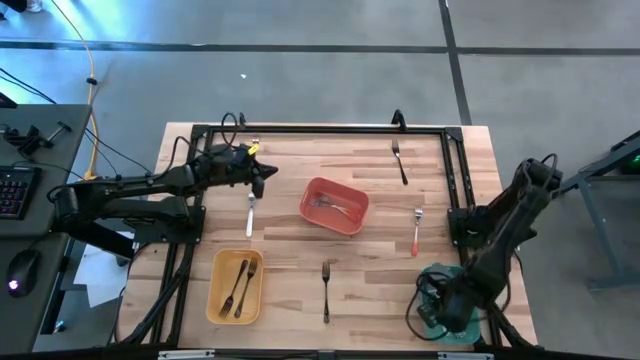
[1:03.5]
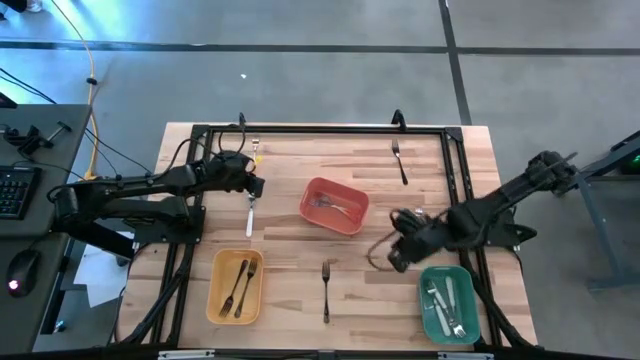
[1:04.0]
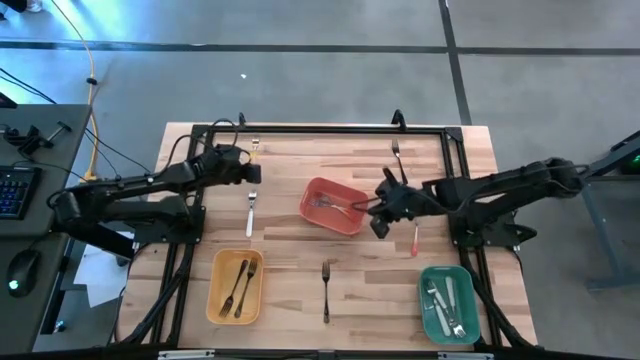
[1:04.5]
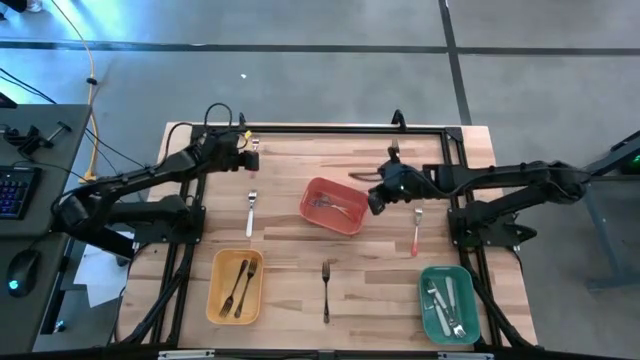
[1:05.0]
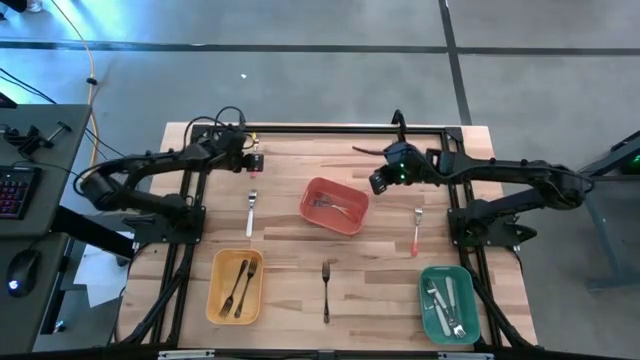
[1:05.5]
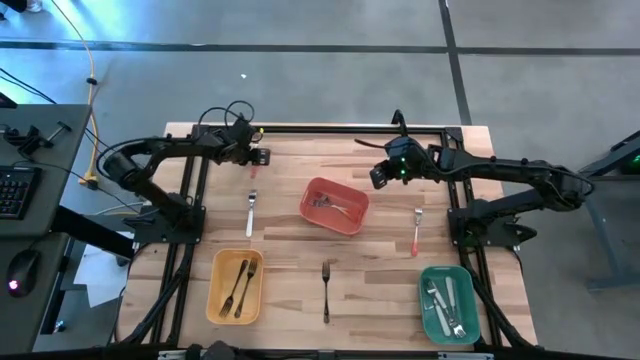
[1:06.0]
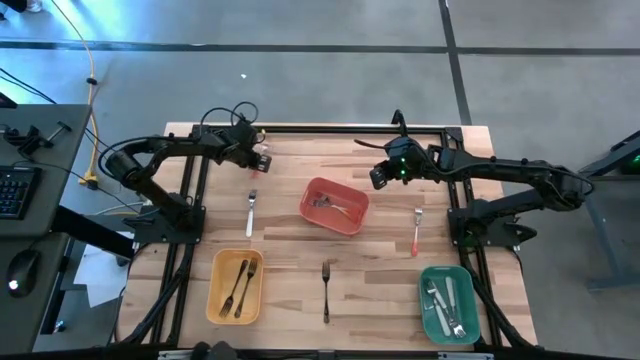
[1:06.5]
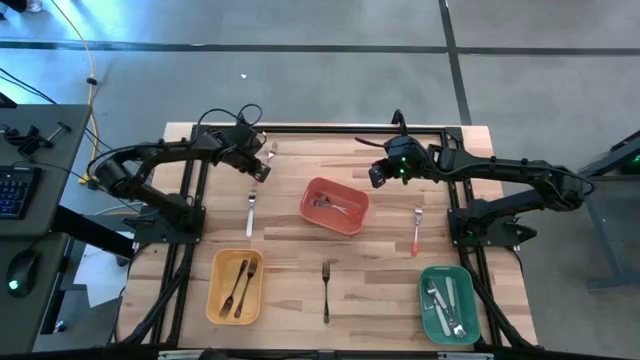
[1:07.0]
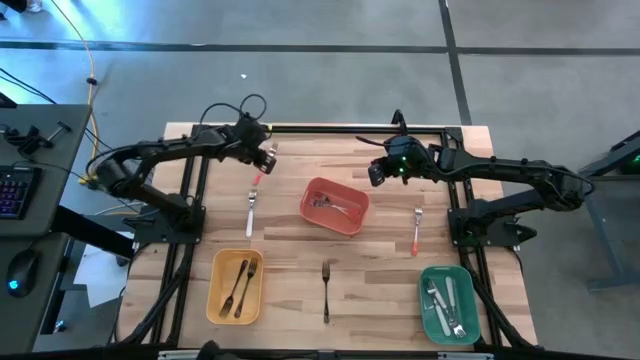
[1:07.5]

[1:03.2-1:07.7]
Task: Sort silverware by color (type)
Put the top orange fork into the orange bin

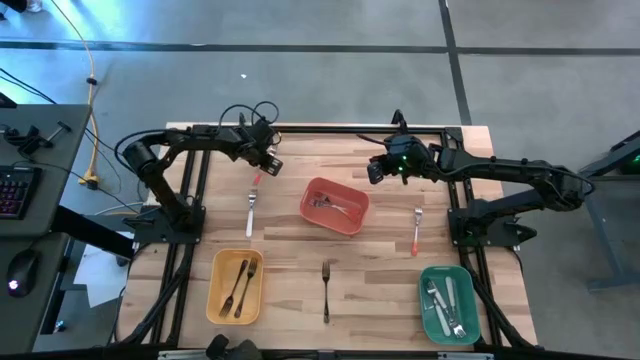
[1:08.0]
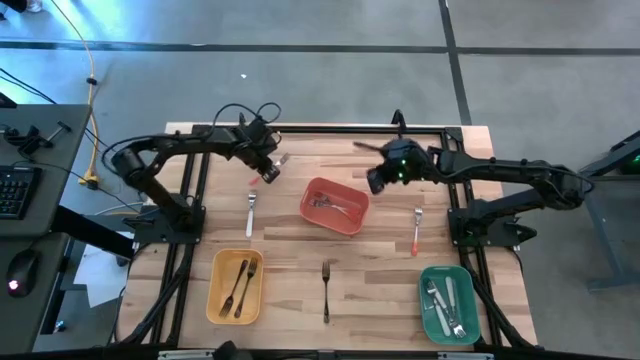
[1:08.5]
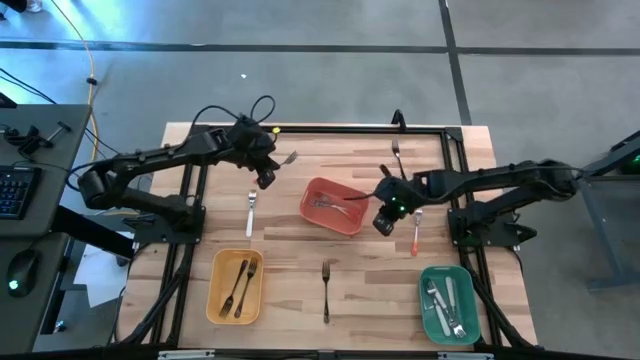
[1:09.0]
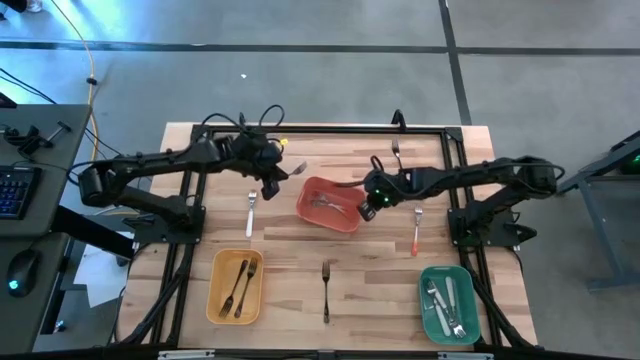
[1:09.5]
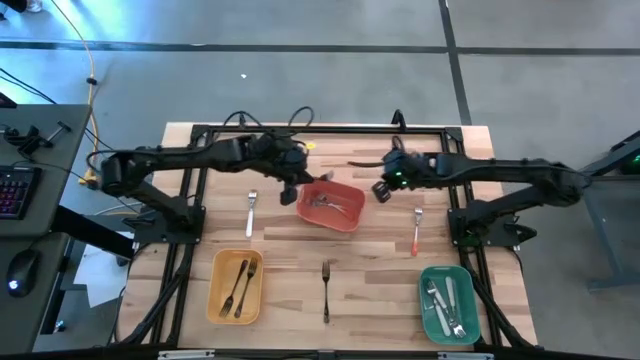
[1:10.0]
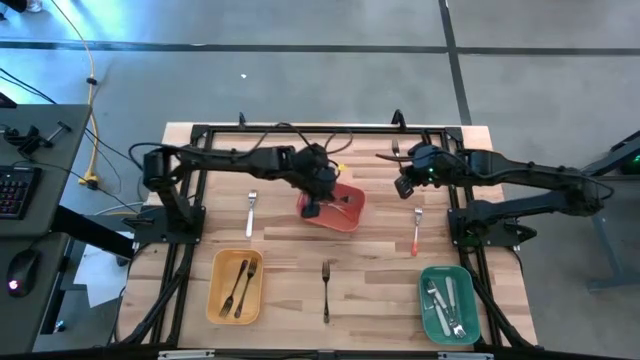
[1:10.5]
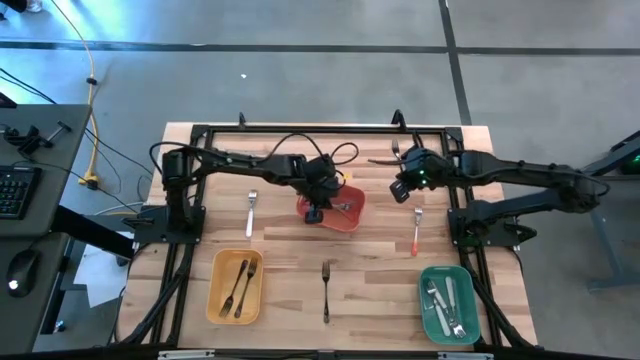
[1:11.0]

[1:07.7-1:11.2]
Put the top orange fork into the orange bin

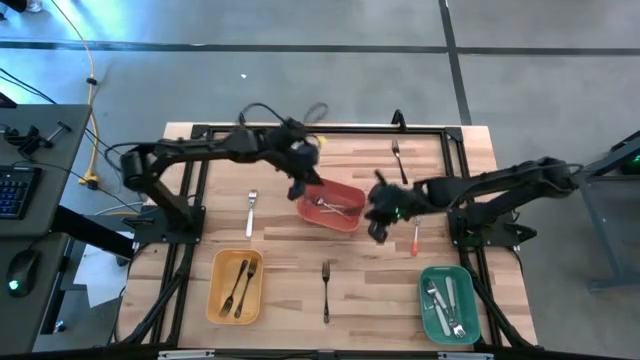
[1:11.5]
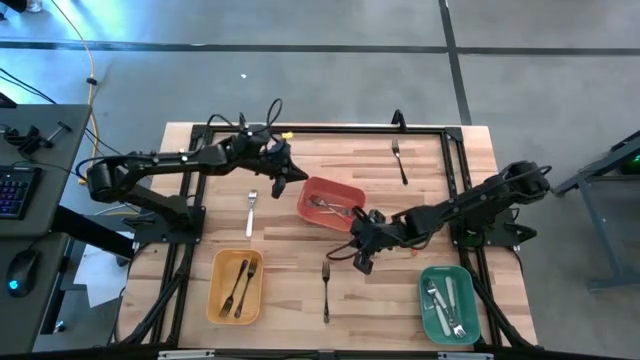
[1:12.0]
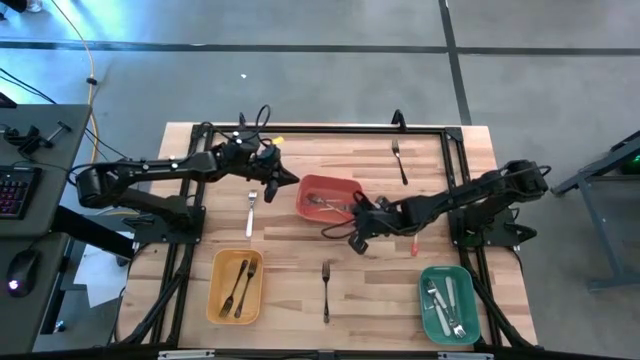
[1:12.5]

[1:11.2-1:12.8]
Adjust the orange bin

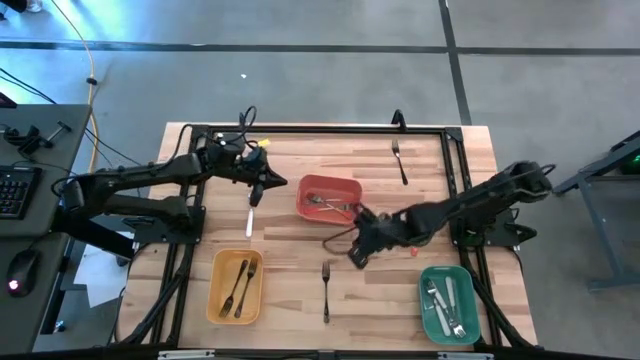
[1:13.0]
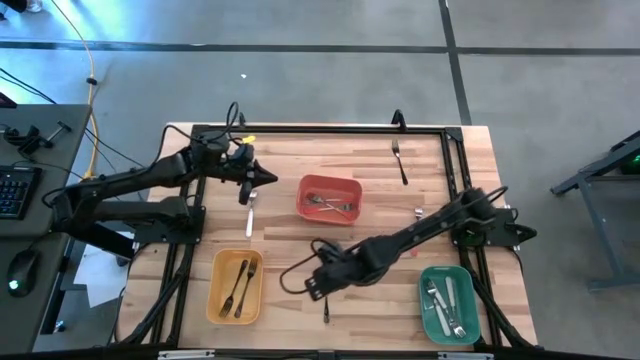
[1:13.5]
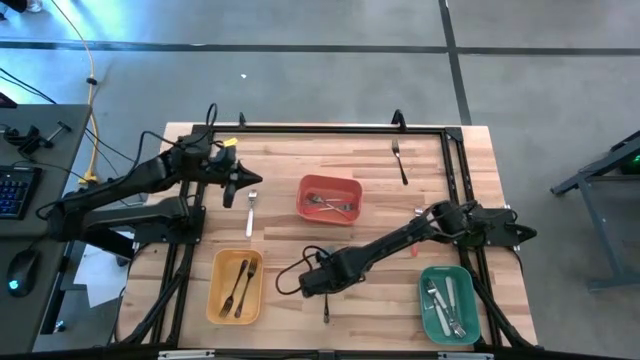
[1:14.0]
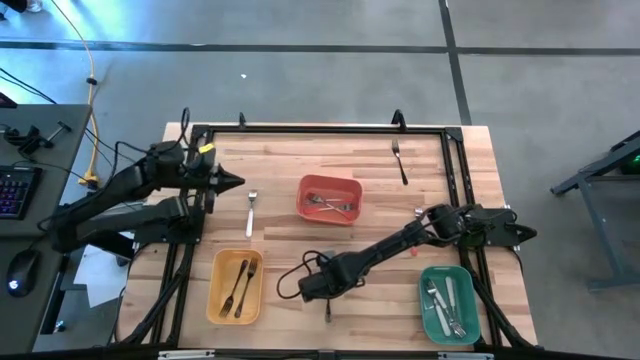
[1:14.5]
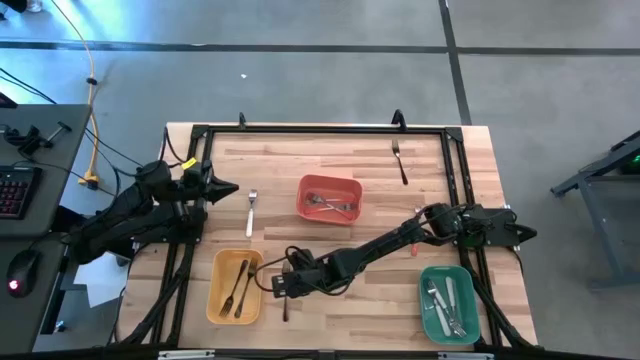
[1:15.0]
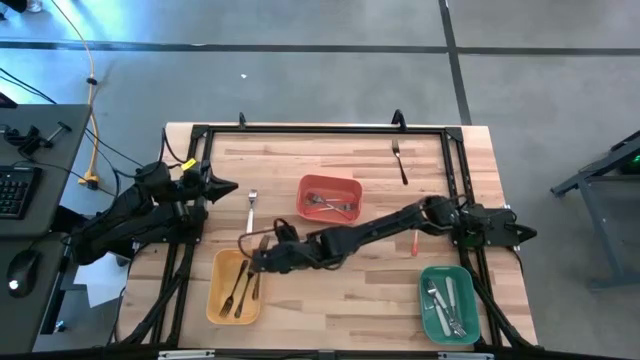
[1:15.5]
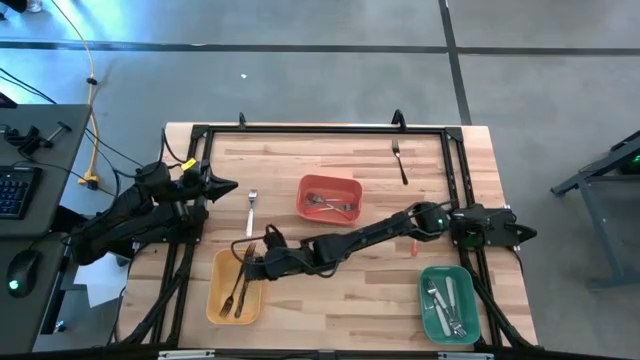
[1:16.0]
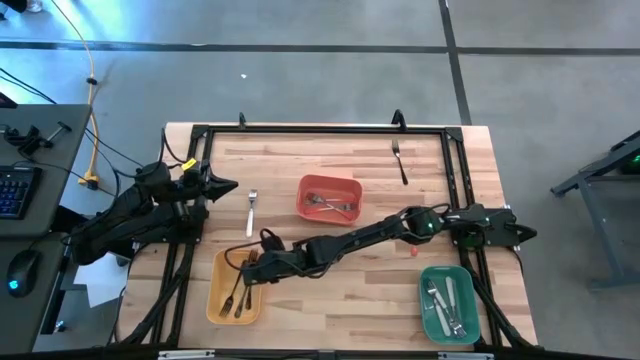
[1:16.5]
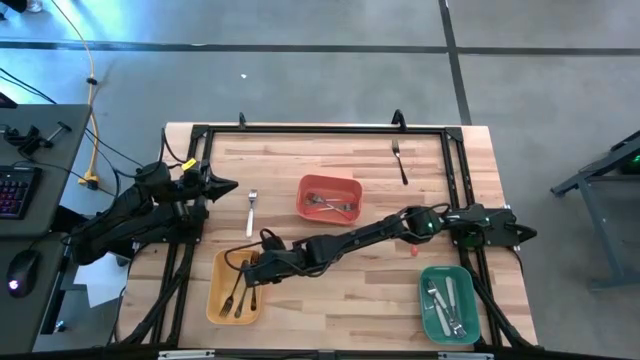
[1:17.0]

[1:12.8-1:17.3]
Put the bottom black fork into the yellow bin

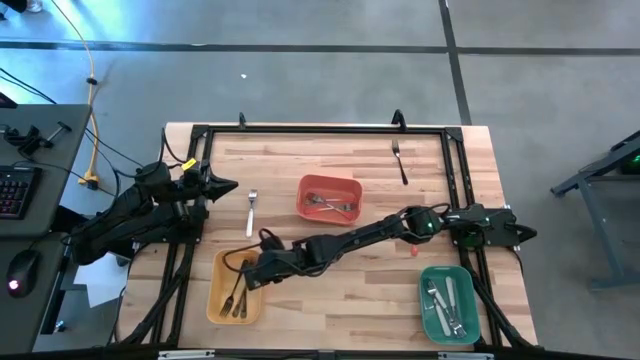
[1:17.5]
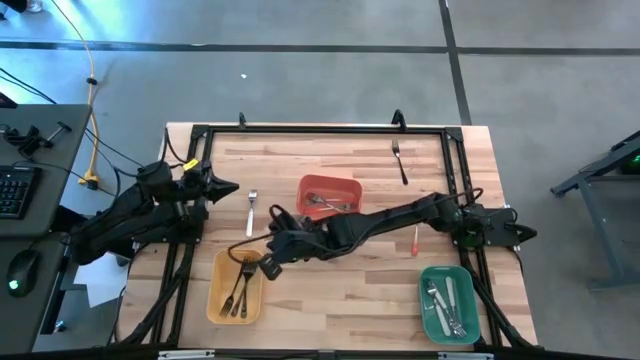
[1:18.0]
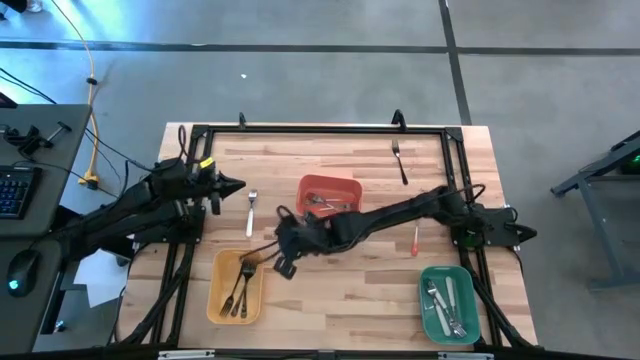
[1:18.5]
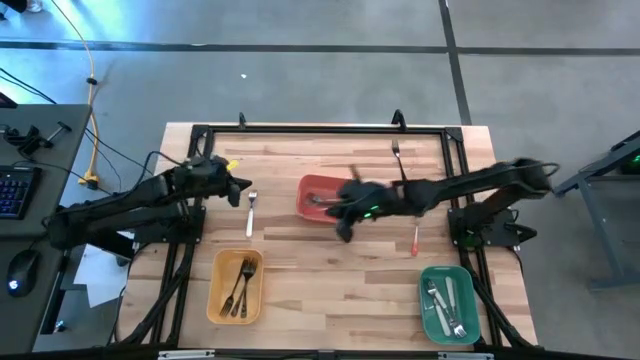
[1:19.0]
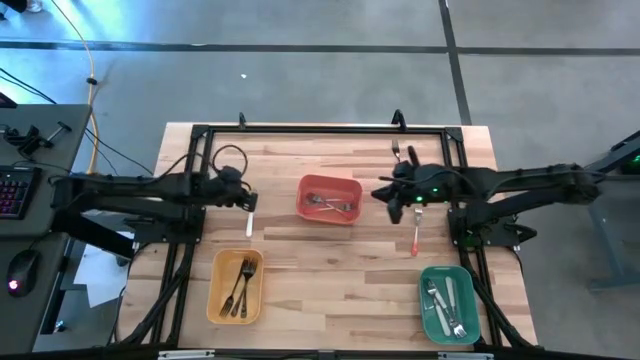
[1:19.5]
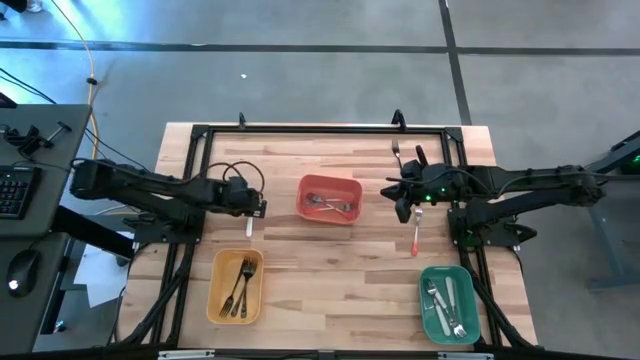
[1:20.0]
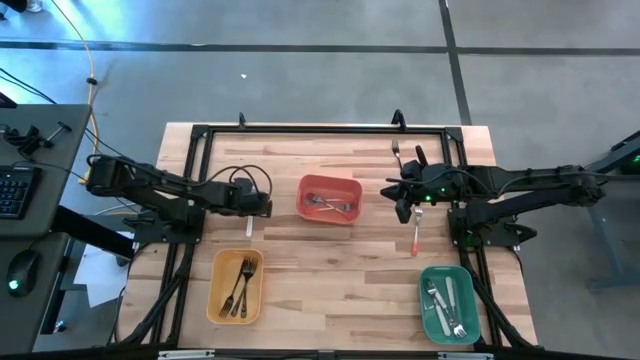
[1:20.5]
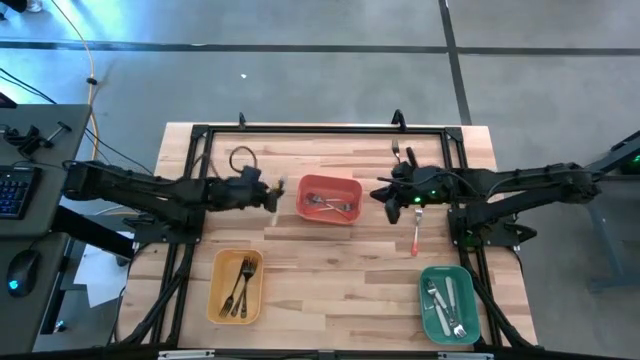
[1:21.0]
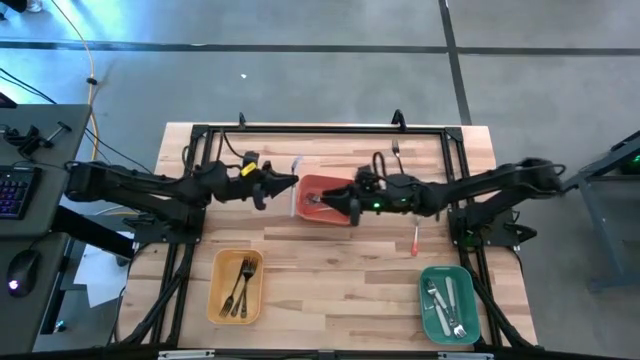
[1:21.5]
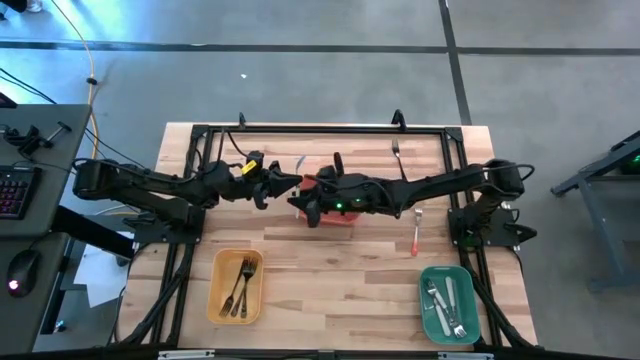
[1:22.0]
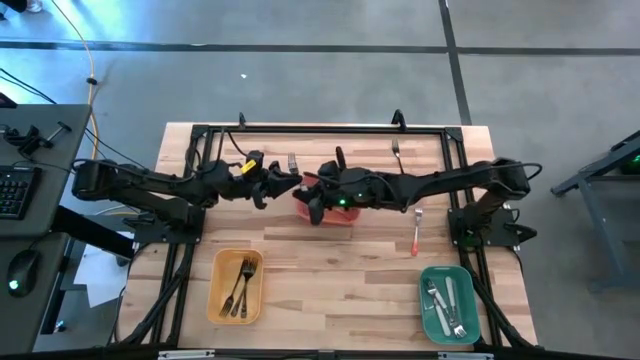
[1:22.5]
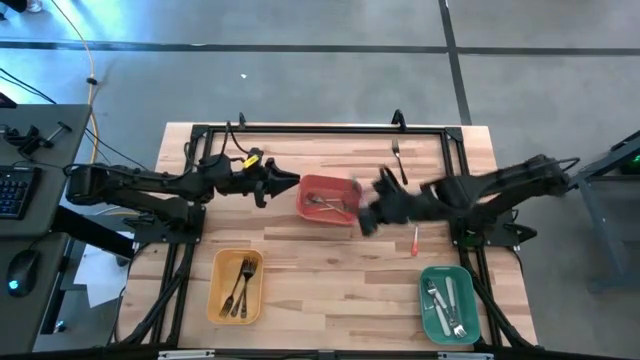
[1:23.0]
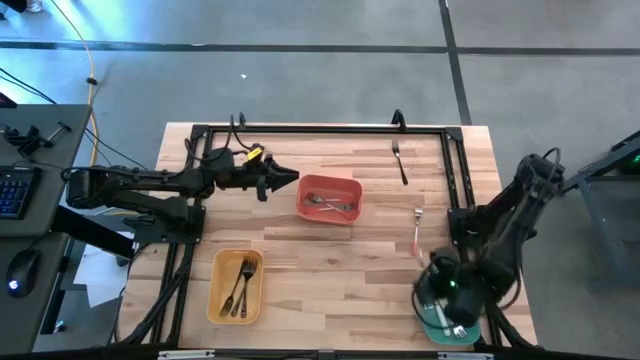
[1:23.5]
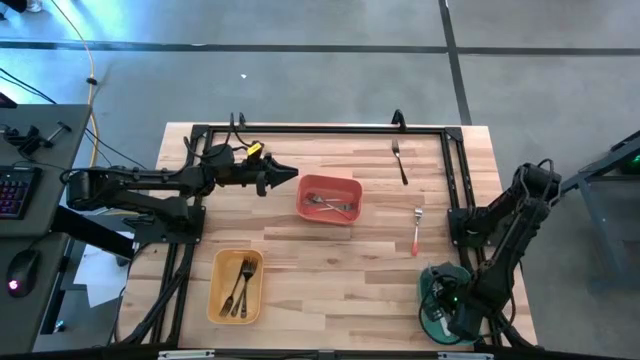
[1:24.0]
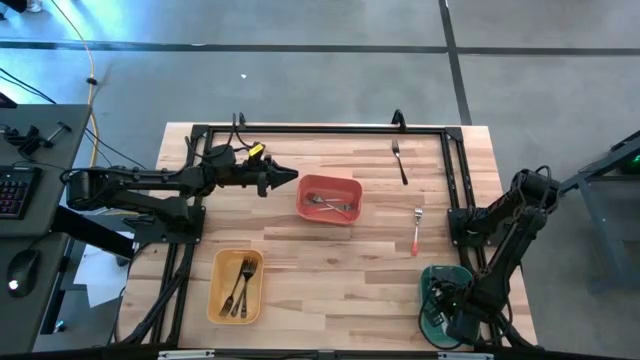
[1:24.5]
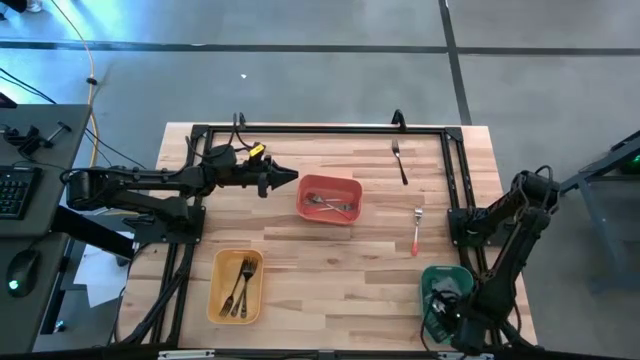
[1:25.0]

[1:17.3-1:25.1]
Put the white fork into the green bin
